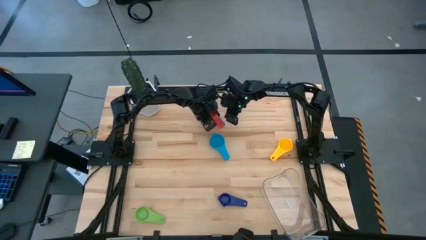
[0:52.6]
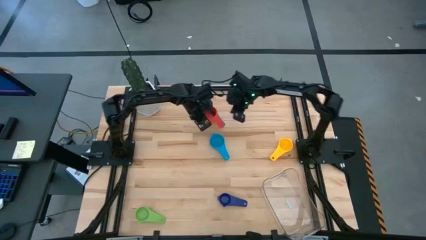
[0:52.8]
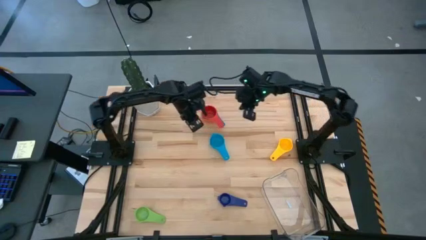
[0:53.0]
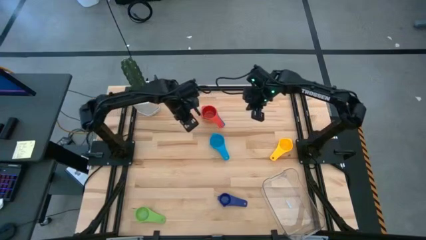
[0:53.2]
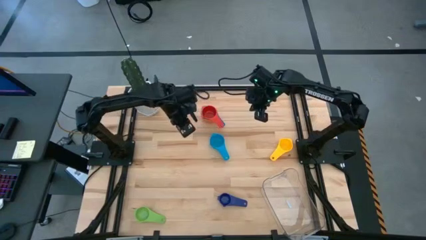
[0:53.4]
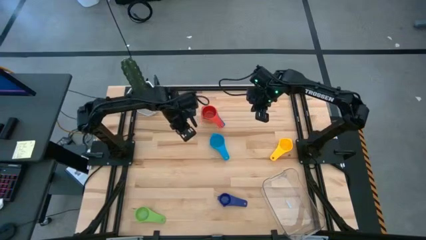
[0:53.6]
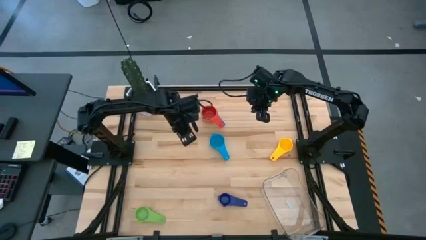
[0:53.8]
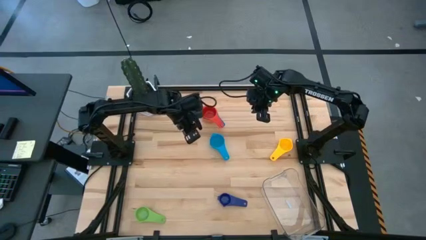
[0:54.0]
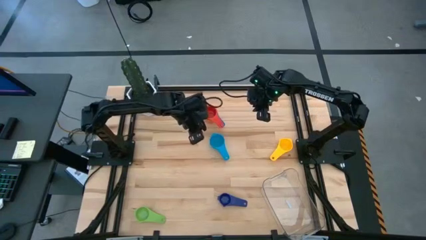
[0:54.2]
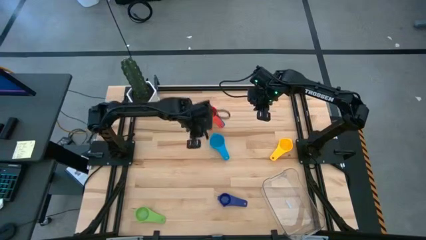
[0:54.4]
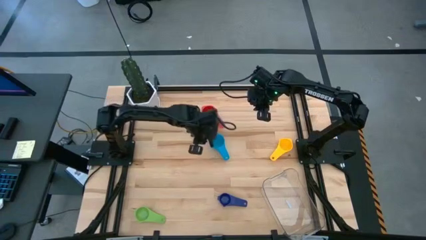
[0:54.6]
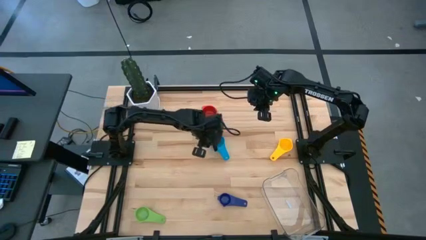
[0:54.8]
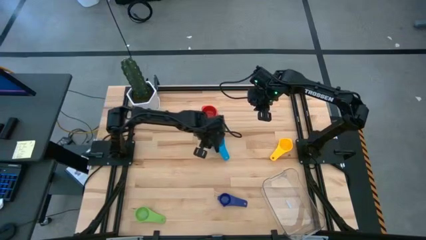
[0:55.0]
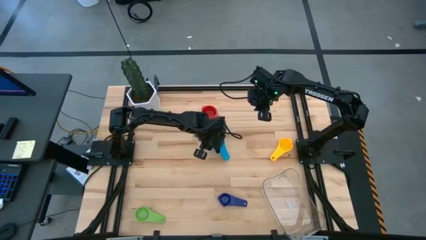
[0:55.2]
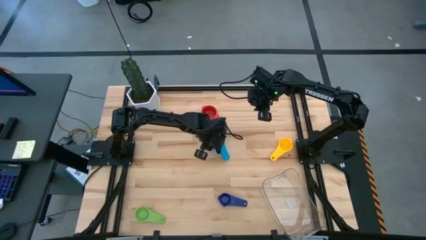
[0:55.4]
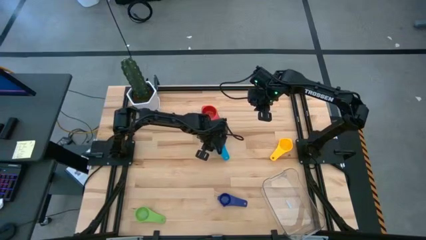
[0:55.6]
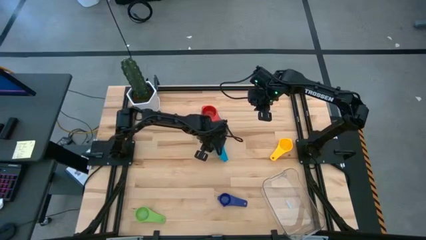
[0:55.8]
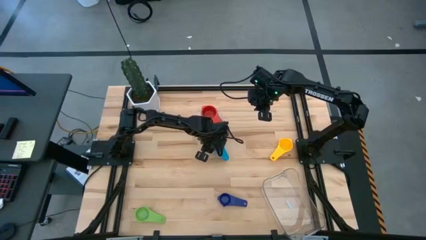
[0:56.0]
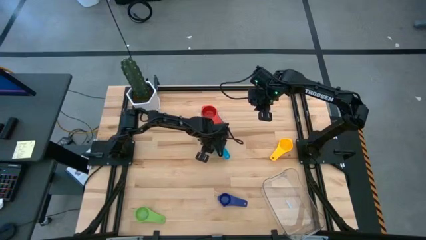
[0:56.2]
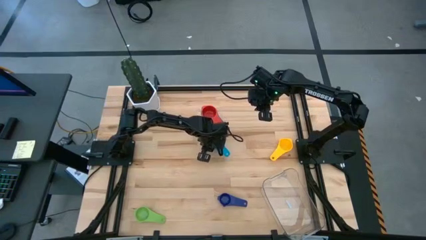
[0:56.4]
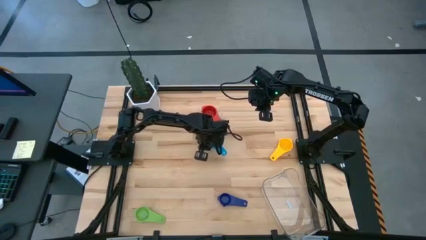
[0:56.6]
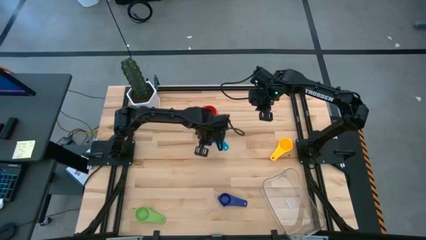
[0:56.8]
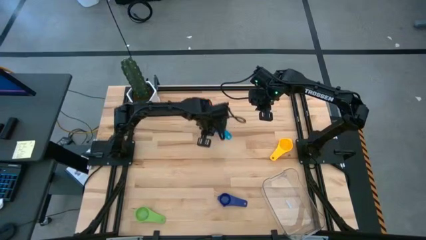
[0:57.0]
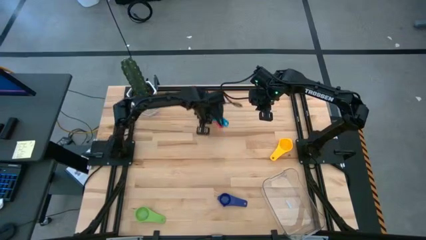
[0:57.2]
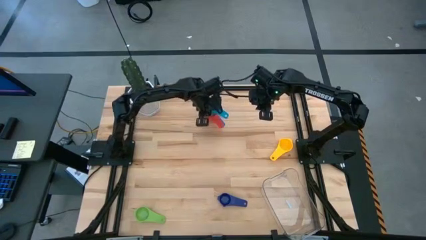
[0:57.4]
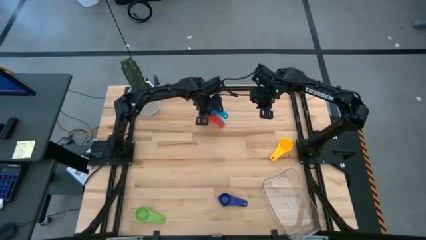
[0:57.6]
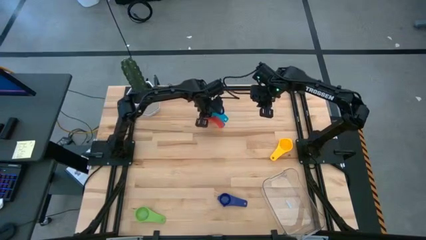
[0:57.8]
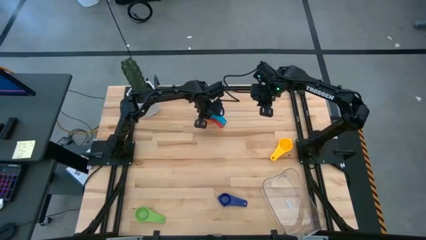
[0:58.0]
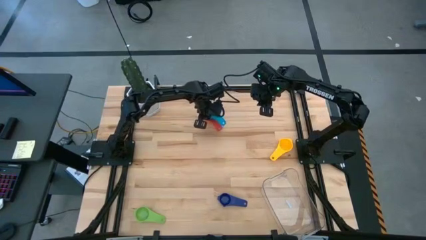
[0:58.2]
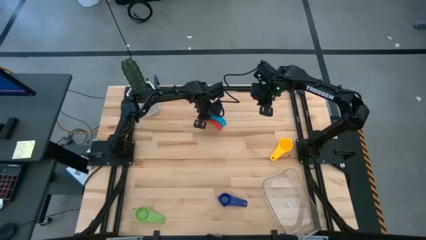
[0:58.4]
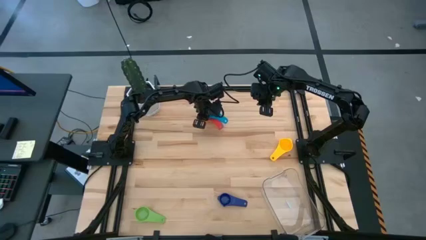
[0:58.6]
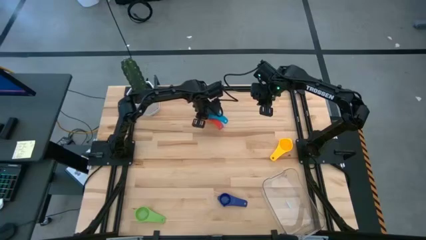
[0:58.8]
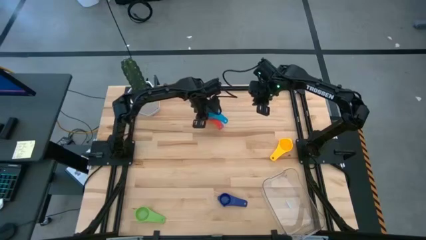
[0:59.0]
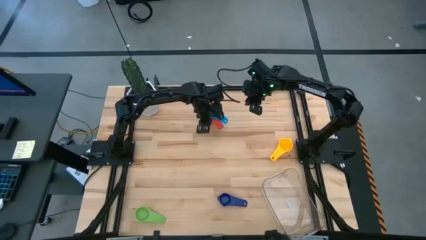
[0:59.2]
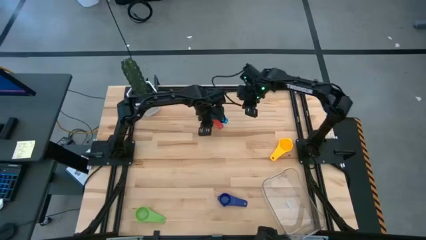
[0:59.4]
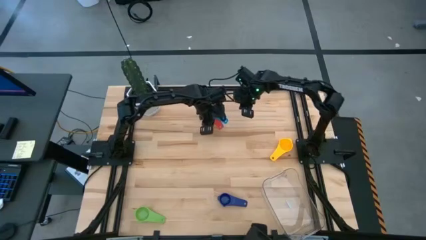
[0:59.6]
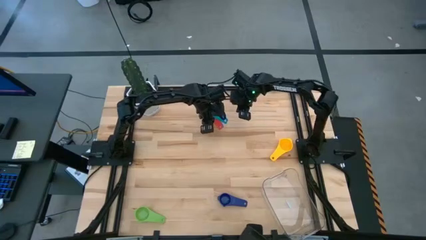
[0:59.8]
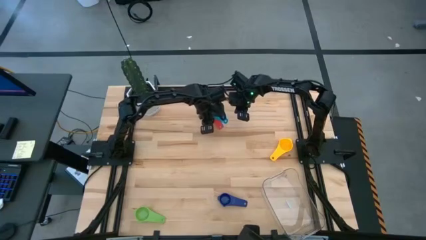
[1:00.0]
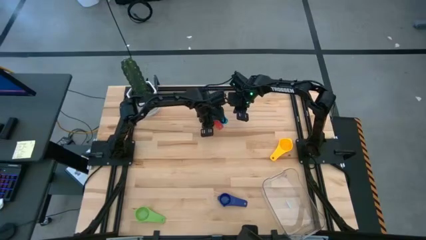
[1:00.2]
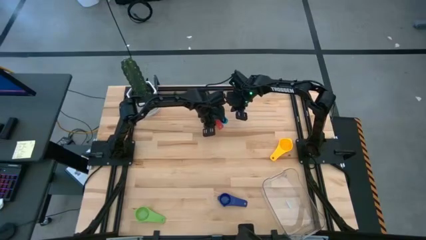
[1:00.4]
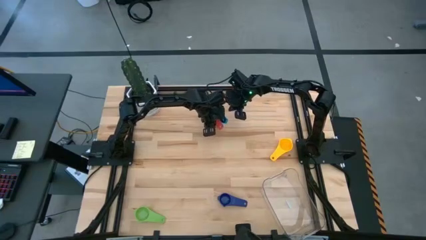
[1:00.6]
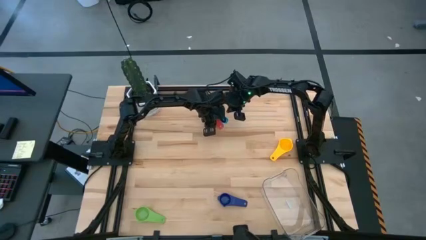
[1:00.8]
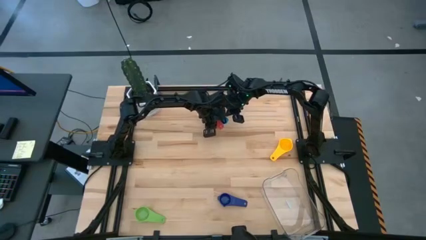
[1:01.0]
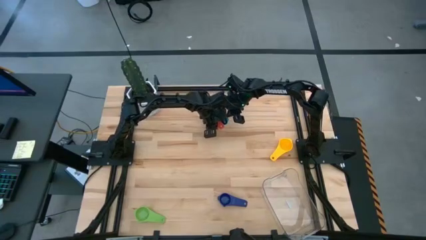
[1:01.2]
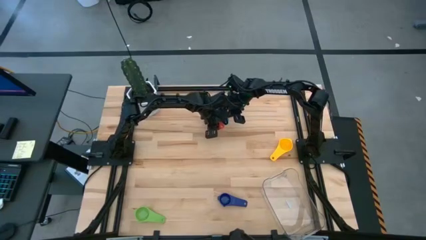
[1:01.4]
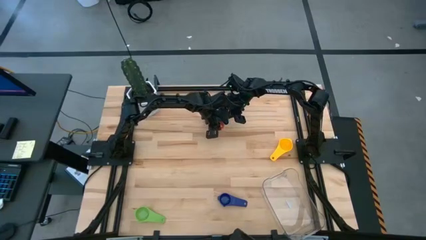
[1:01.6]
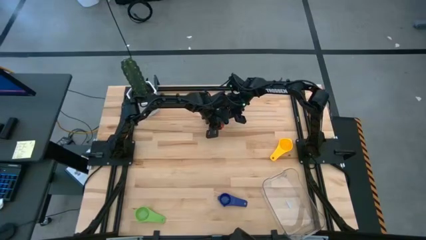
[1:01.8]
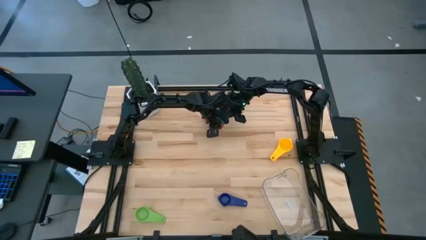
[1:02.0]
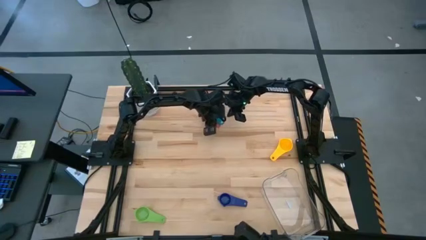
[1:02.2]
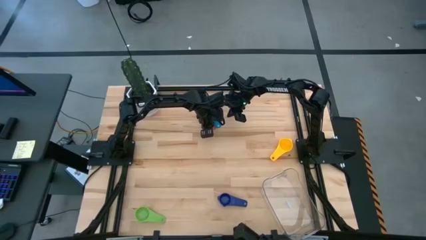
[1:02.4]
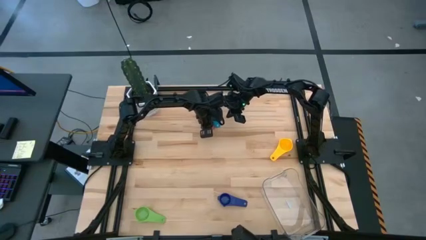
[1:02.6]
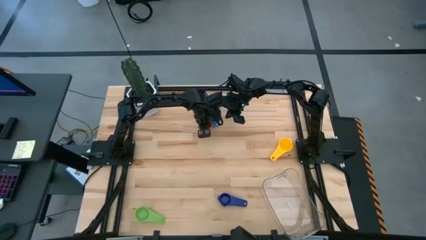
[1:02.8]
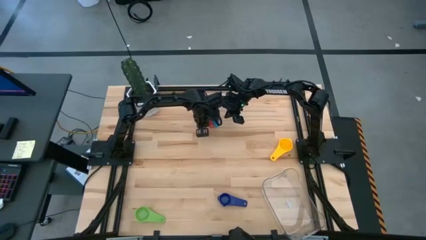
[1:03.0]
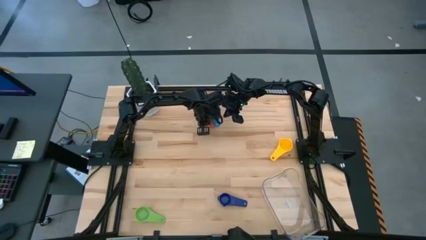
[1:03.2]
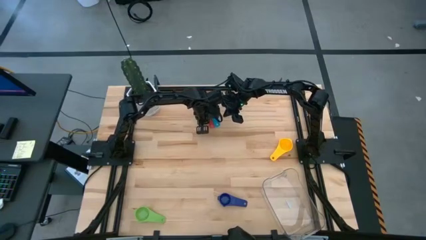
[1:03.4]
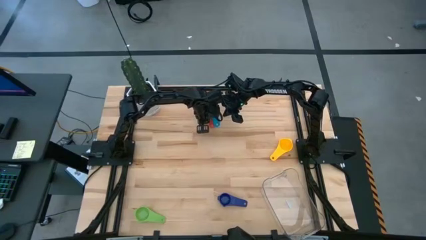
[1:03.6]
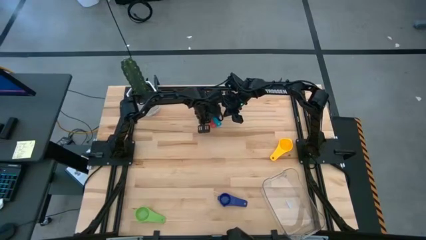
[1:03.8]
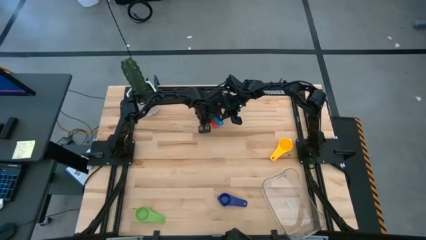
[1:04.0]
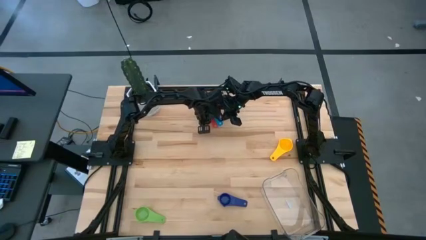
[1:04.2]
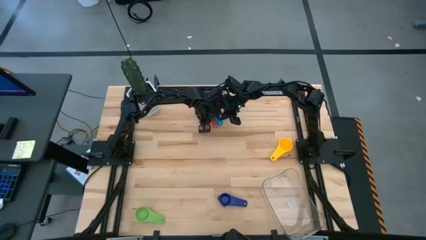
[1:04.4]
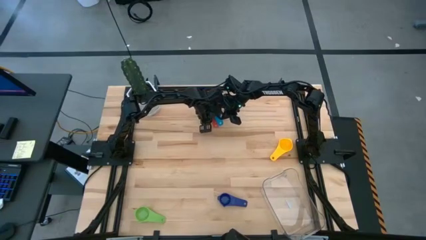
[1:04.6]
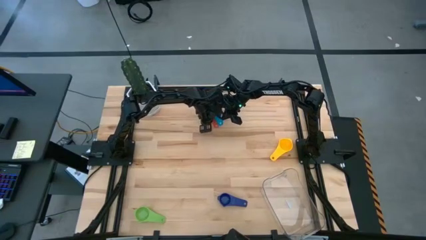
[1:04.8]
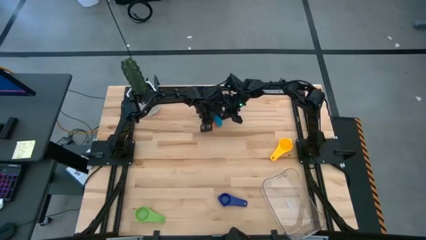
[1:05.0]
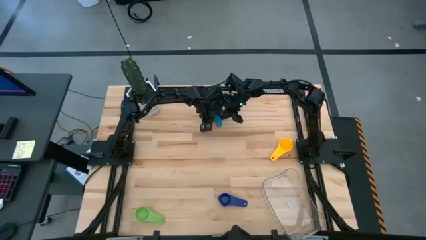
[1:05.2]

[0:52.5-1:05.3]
Task: Nest measuring cups in basket
Stack the blue measuring cup on top of the red measuring cup
